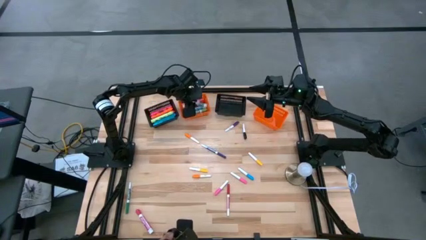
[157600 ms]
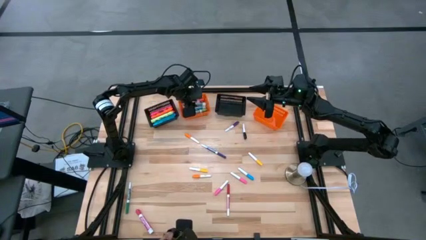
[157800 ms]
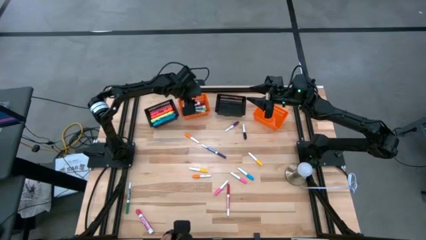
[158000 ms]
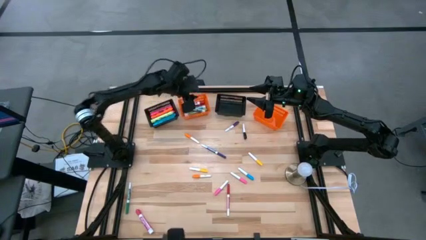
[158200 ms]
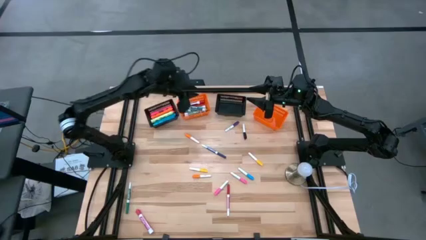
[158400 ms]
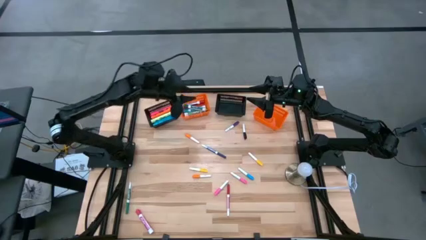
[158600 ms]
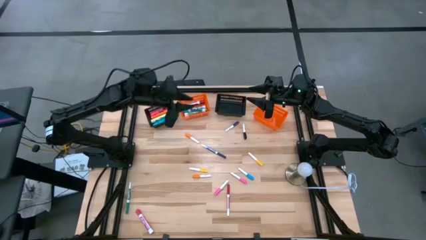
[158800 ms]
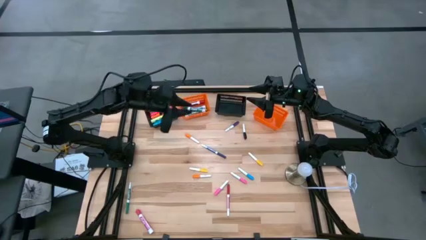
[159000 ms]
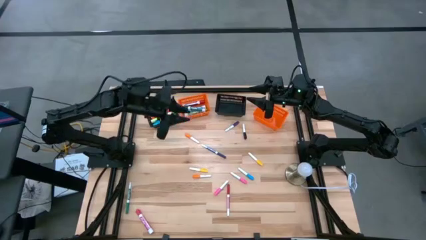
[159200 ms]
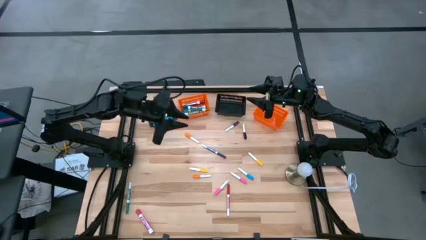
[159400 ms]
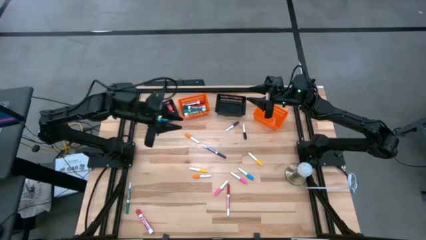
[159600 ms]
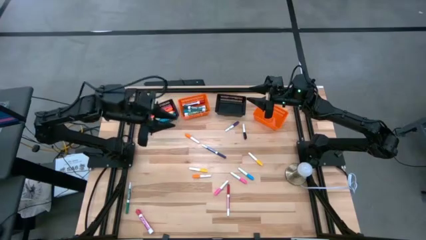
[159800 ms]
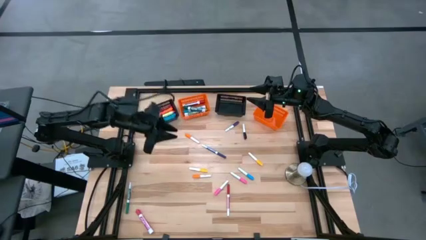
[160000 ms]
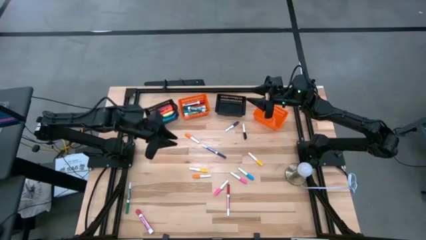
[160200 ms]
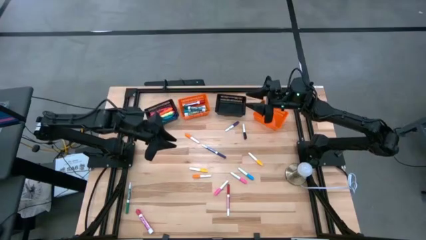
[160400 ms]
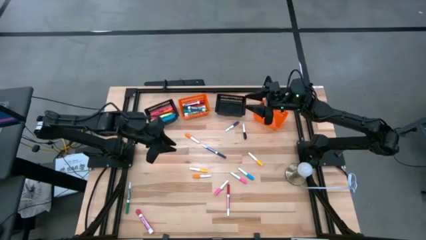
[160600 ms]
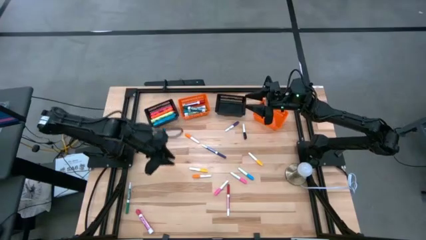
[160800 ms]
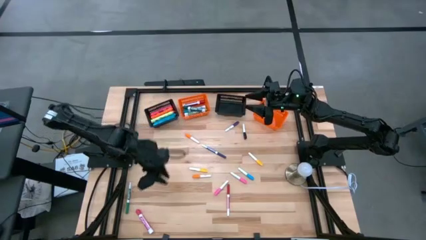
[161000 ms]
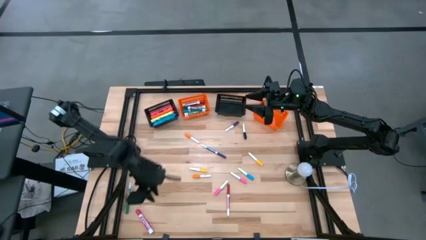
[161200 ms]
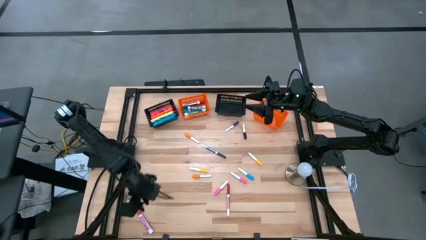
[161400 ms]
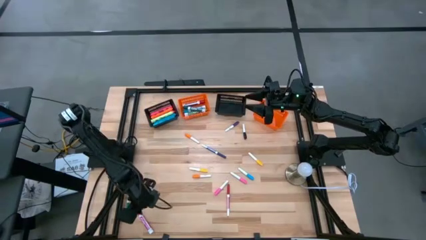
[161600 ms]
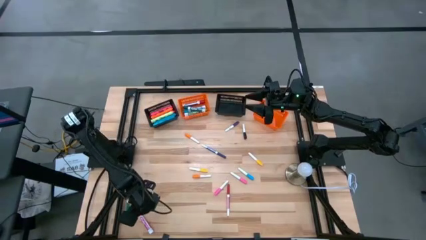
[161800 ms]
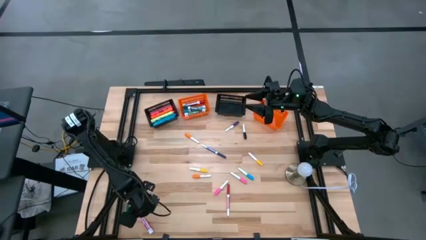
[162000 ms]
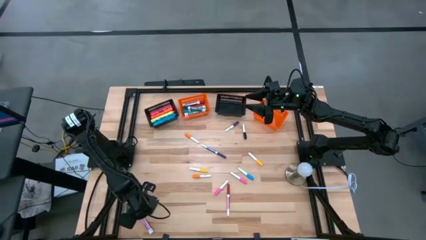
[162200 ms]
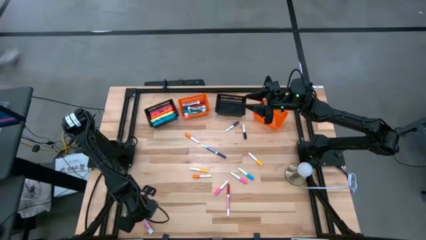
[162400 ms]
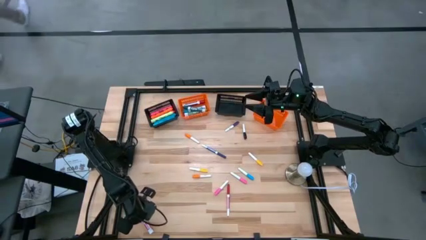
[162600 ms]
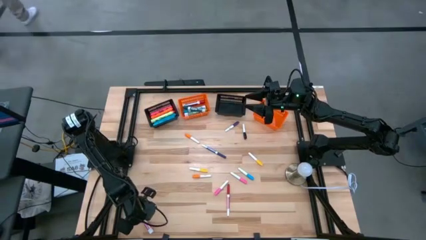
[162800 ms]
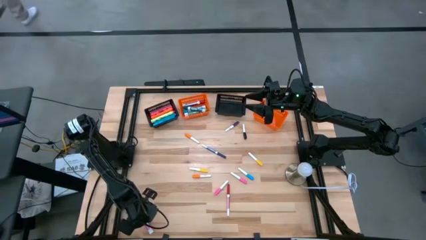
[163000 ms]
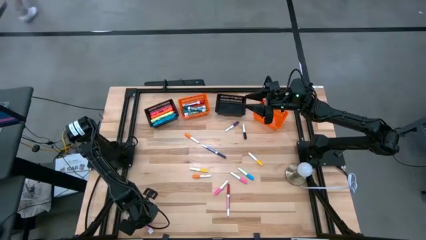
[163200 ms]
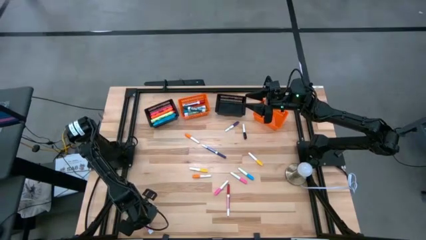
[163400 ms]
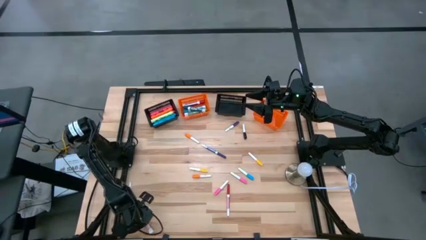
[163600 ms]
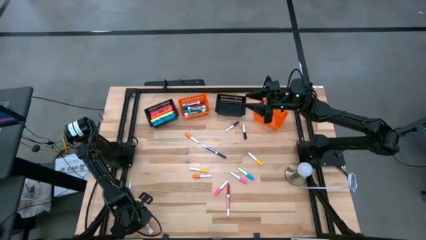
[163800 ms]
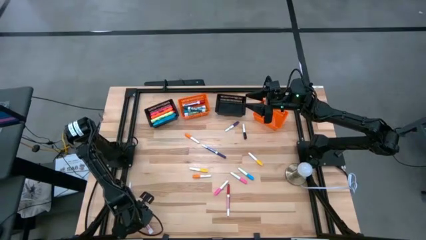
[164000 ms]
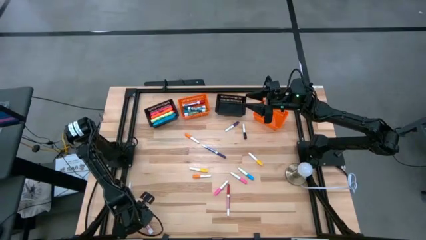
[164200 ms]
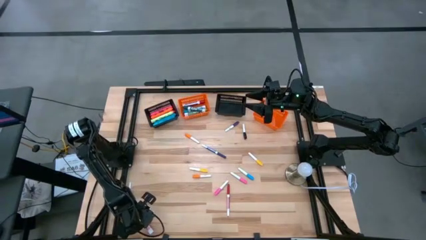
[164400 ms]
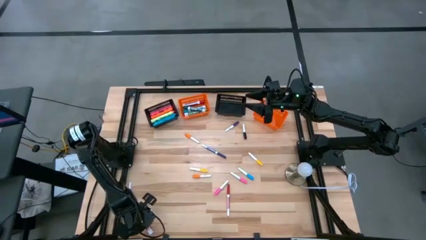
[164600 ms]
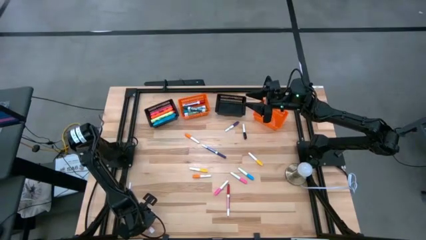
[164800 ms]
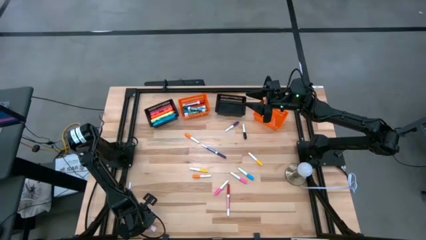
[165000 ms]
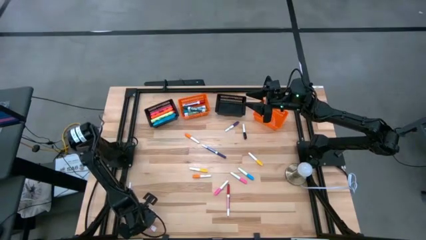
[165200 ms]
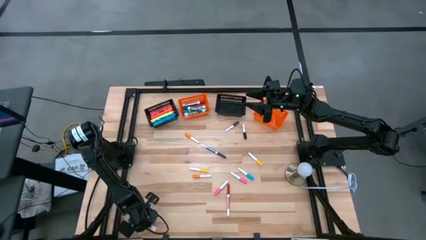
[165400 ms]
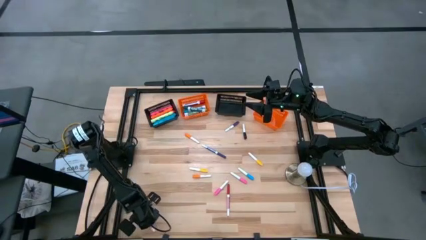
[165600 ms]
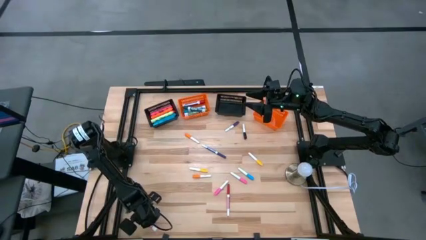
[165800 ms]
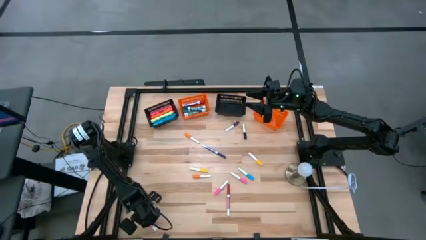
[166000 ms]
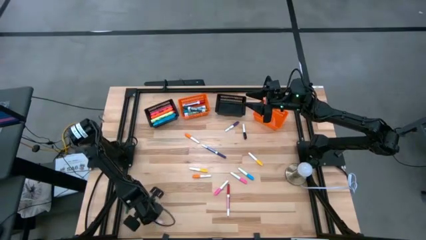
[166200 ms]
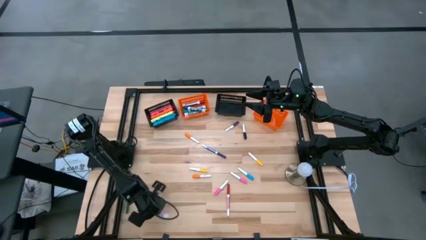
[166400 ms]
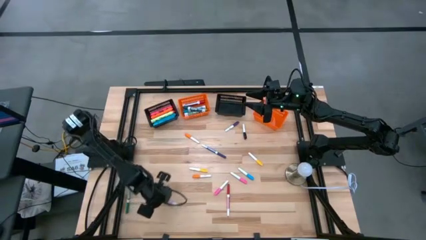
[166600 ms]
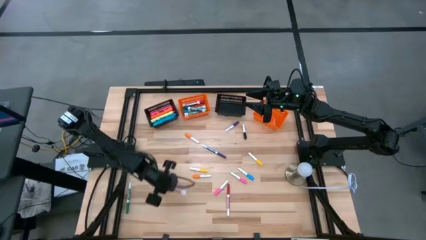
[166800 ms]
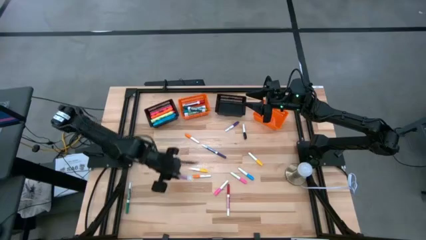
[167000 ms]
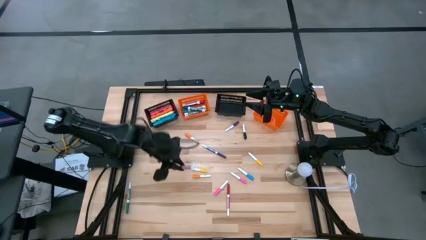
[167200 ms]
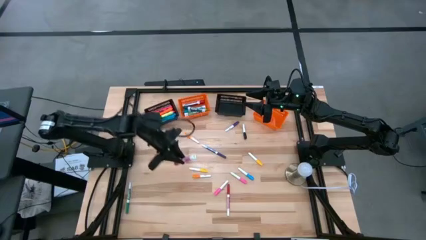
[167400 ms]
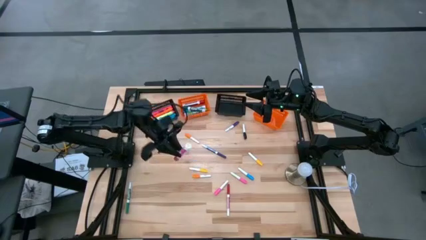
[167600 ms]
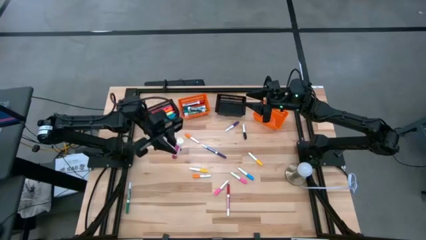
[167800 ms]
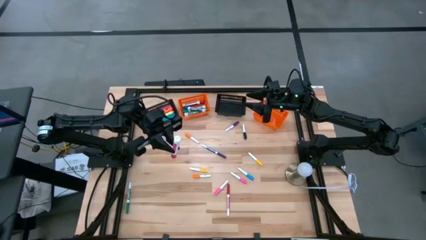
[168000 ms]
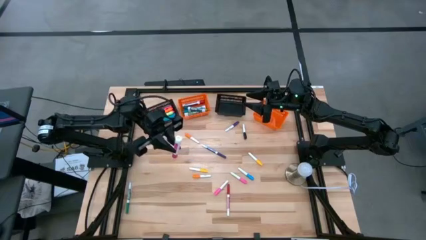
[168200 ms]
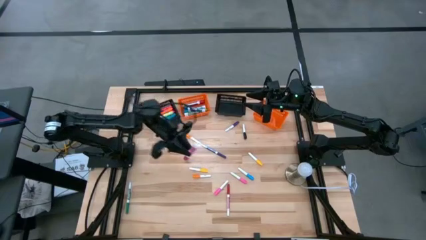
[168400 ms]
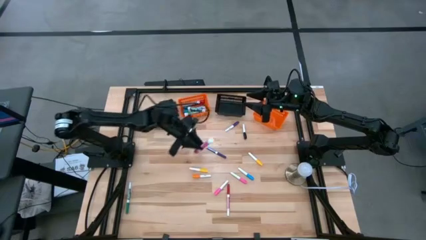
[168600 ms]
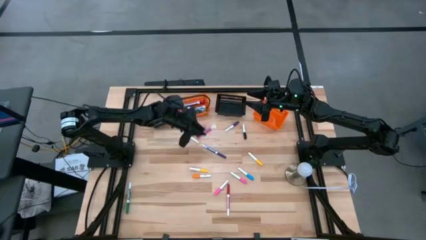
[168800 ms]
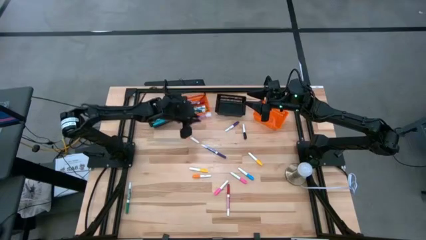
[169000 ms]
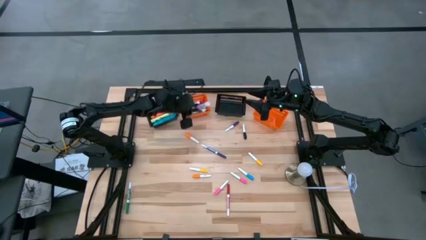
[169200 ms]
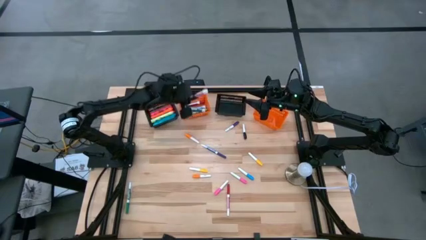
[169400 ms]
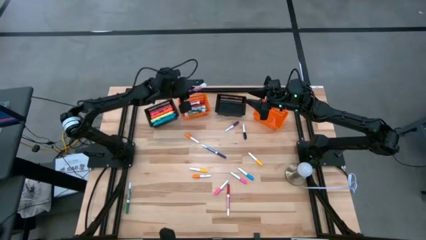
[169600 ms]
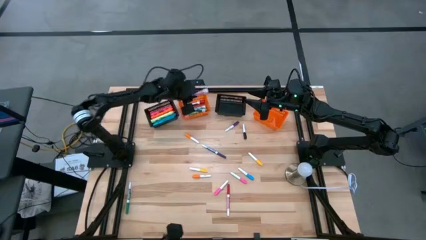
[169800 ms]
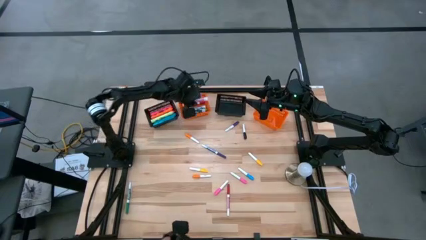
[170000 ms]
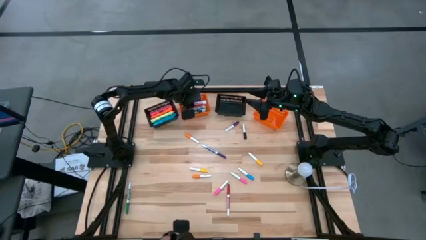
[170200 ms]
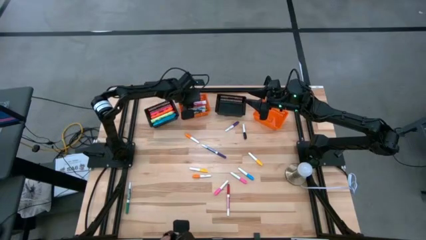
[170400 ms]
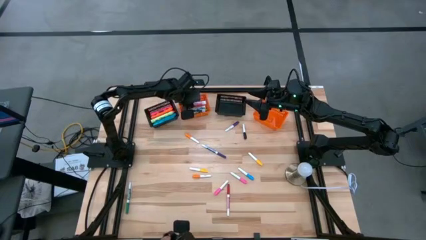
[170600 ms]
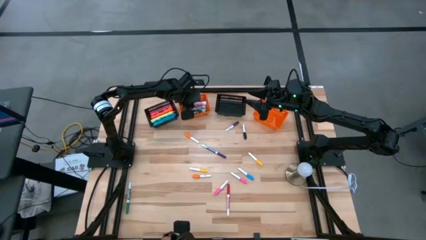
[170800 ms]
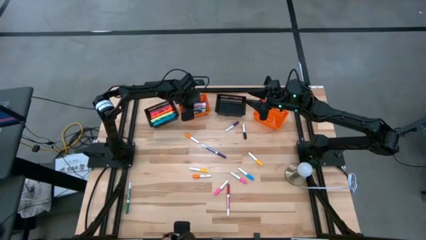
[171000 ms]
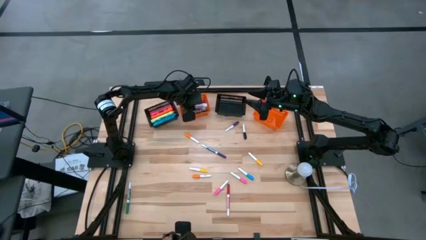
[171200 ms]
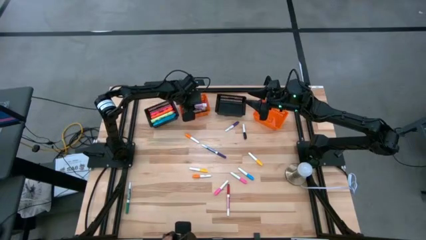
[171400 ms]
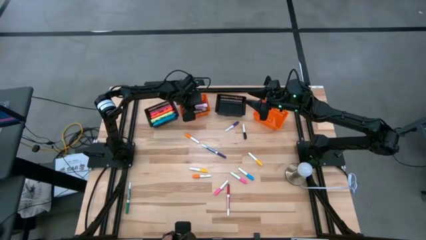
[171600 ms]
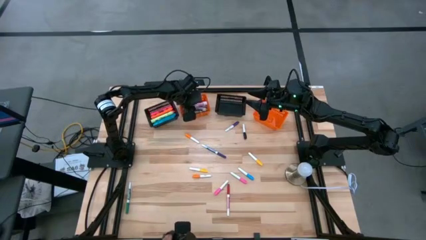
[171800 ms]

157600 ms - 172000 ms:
Task: Pick & Place Markers
Put the pink marker pen into the left orange bin

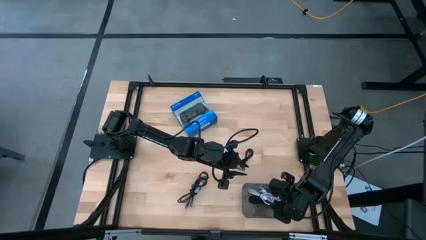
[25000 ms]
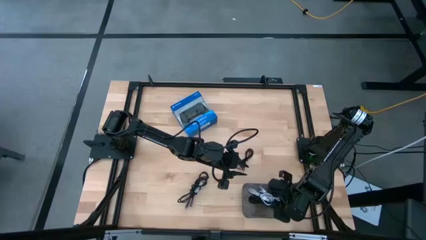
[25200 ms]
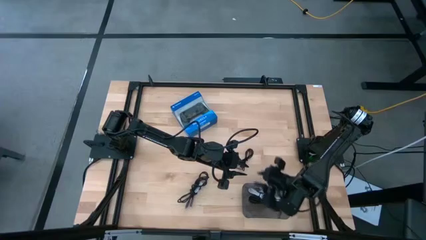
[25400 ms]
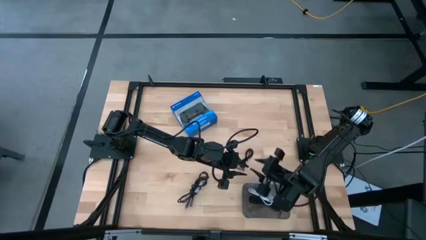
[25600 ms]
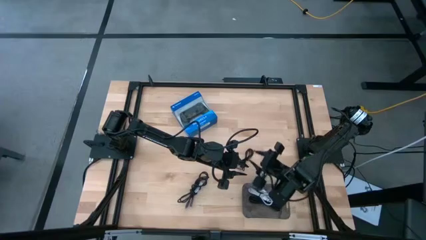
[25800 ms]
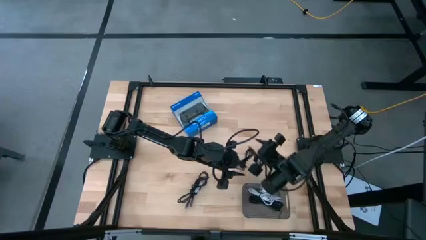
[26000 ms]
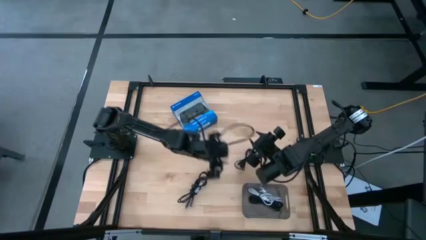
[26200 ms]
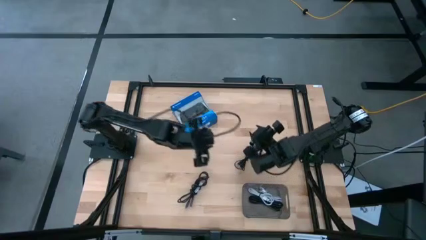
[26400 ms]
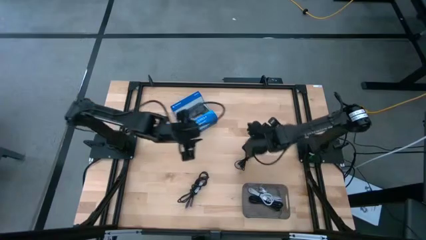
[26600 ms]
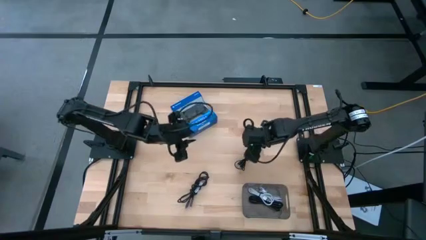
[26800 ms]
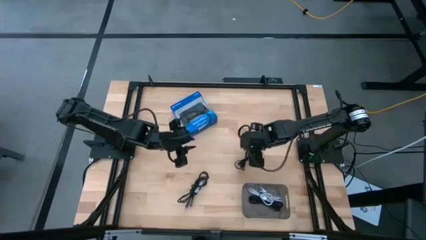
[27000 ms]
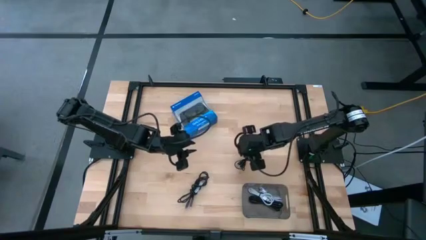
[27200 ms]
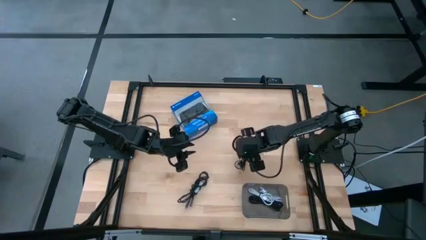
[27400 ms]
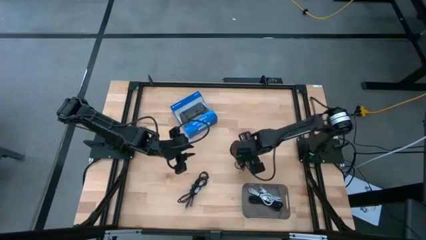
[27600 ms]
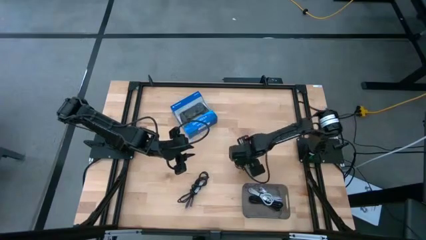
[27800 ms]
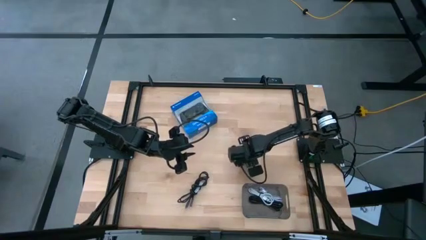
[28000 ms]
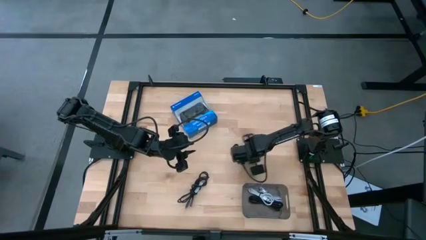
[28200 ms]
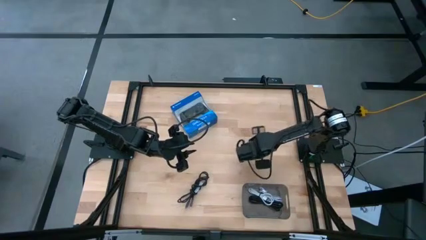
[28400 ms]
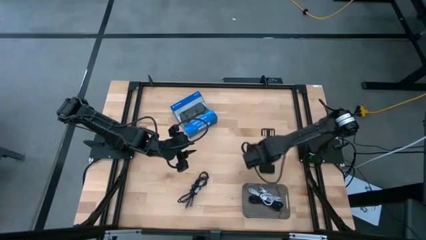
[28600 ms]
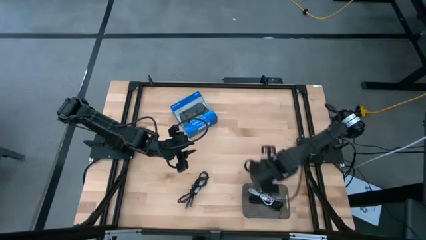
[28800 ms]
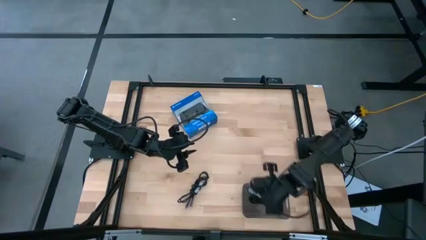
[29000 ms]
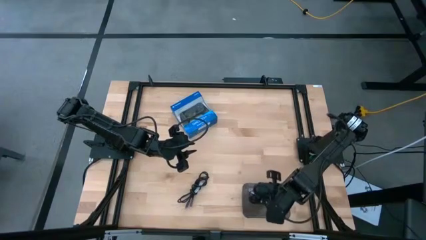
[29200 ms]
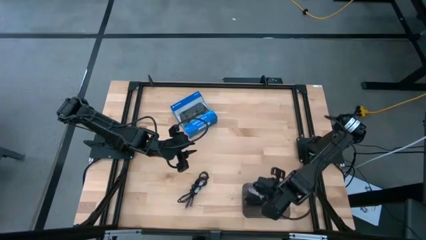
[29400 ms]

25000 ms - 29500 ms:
Task: Pick and place USB-C Cables
Put the right black usb cable into the grey transparent bin
